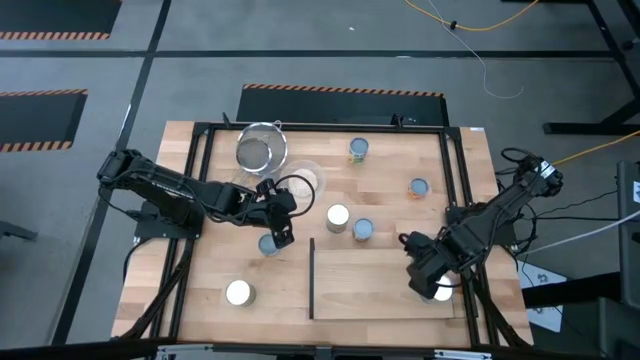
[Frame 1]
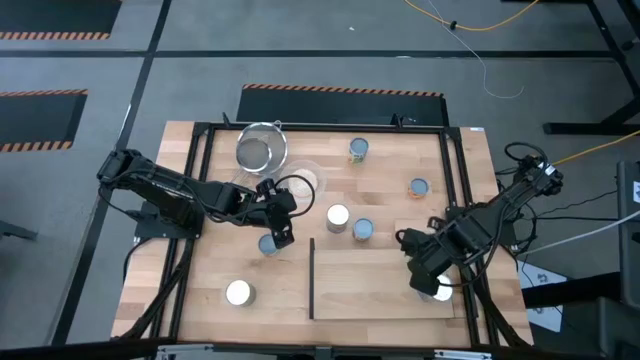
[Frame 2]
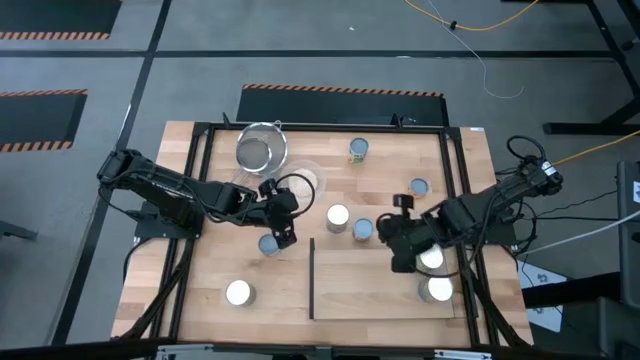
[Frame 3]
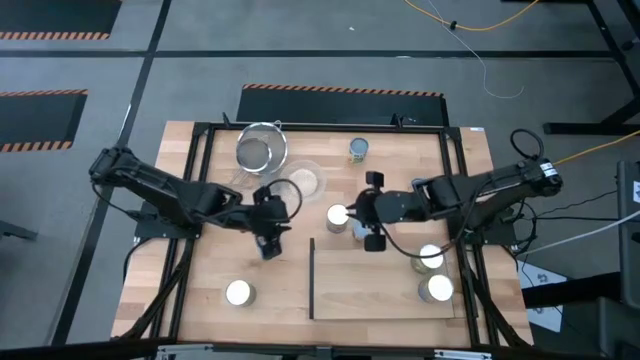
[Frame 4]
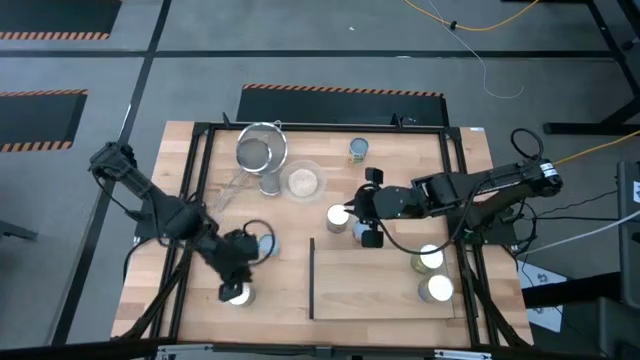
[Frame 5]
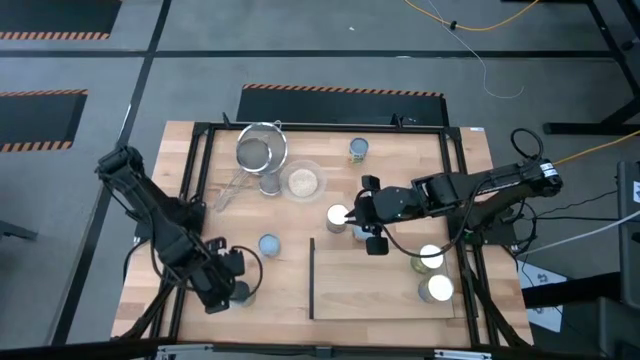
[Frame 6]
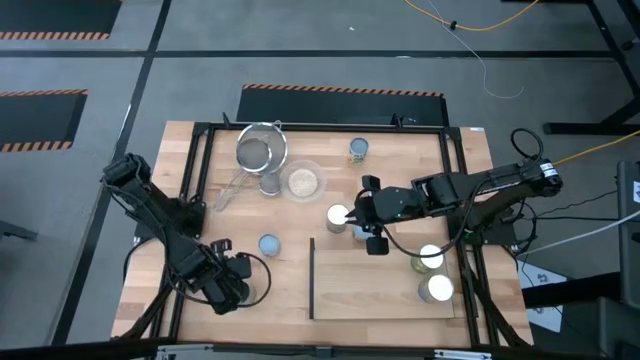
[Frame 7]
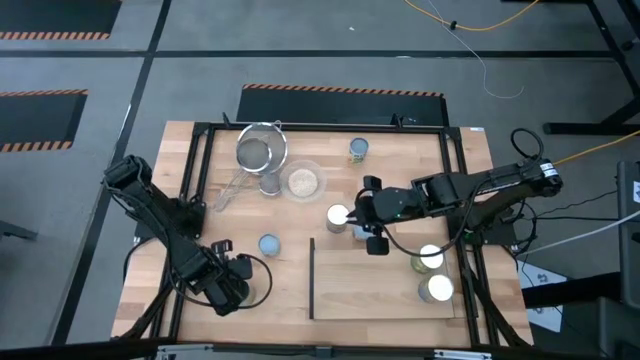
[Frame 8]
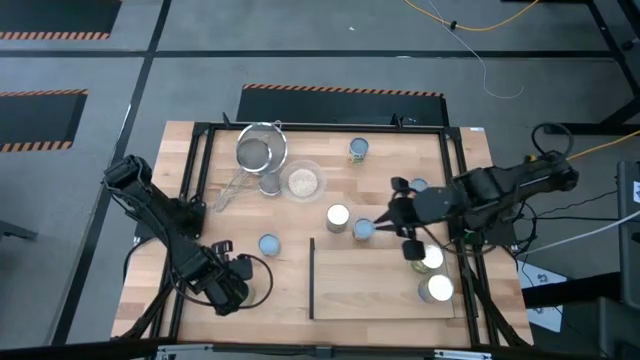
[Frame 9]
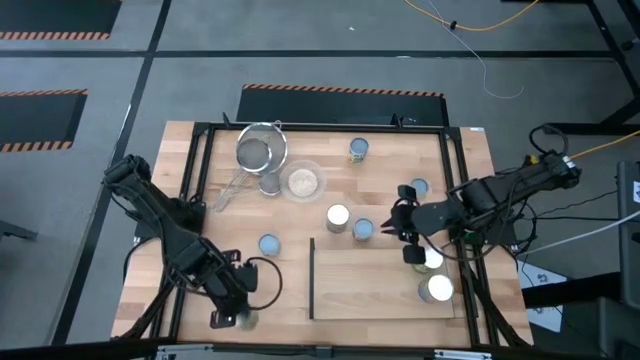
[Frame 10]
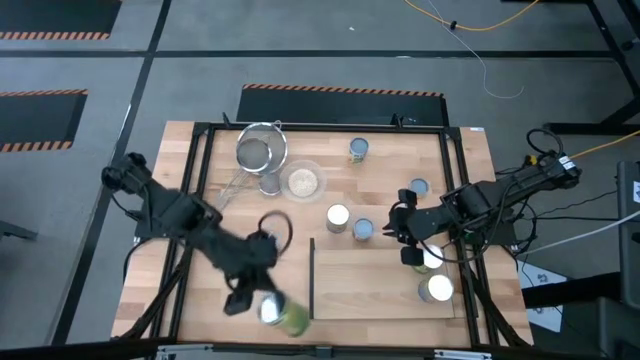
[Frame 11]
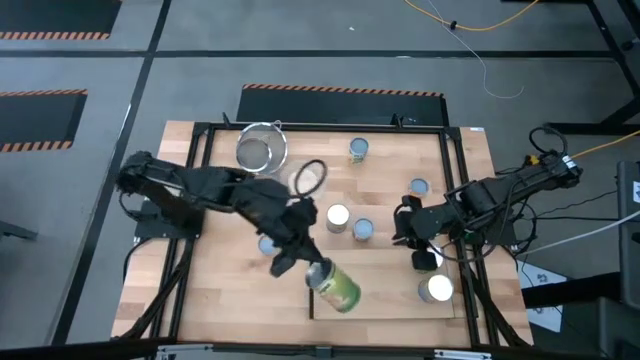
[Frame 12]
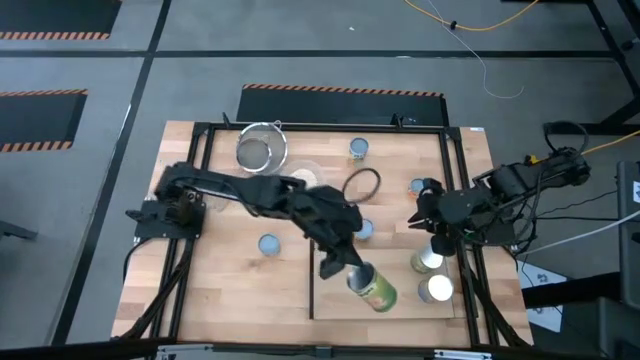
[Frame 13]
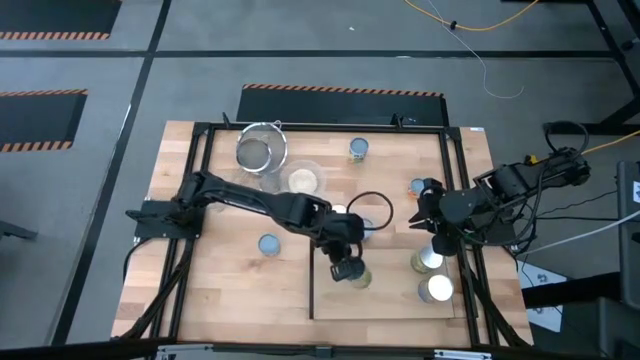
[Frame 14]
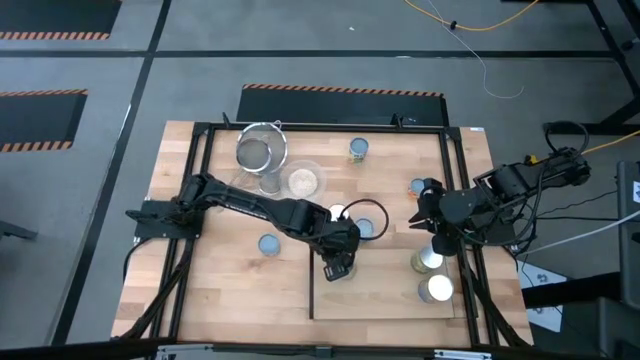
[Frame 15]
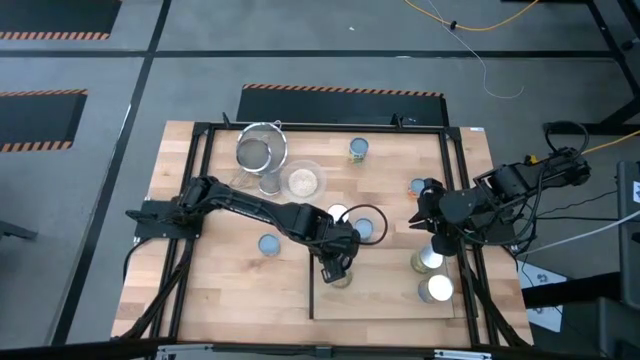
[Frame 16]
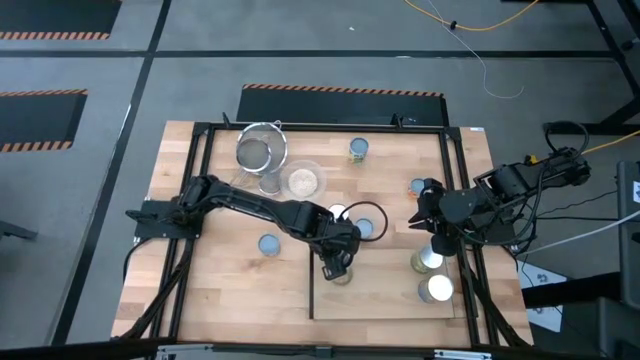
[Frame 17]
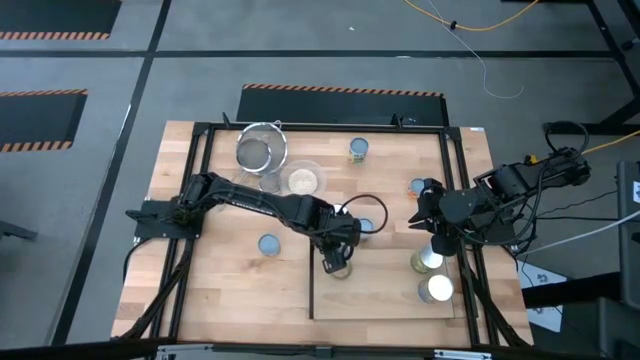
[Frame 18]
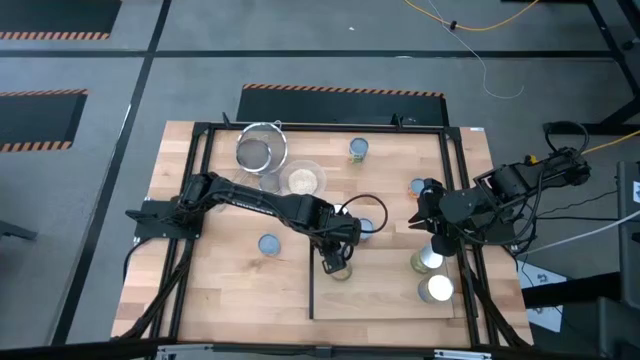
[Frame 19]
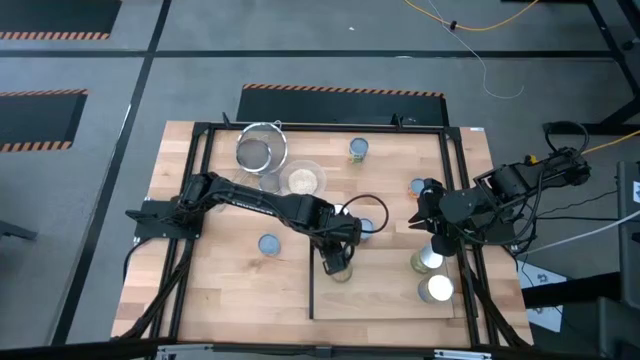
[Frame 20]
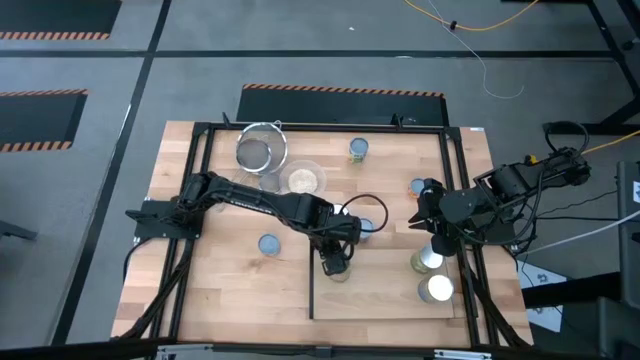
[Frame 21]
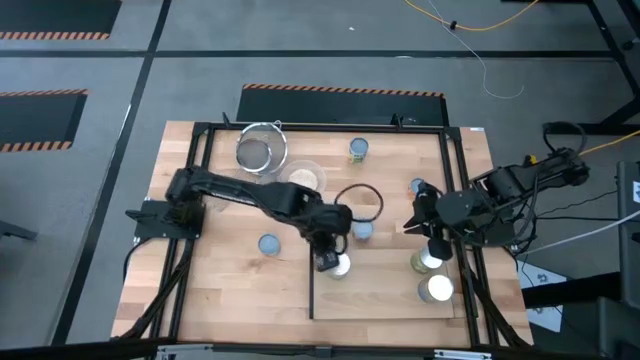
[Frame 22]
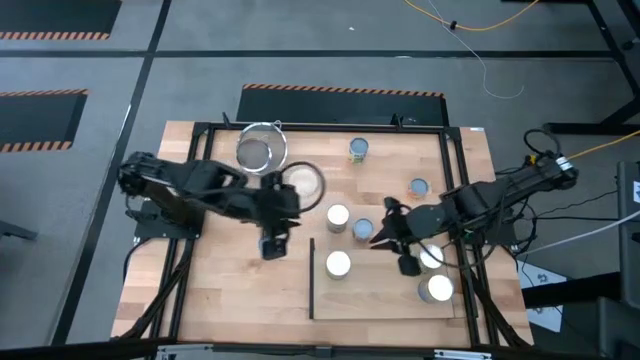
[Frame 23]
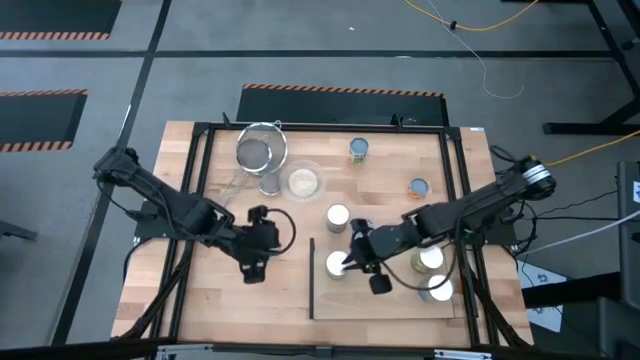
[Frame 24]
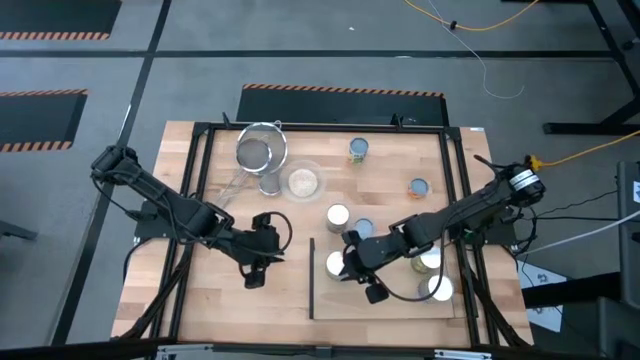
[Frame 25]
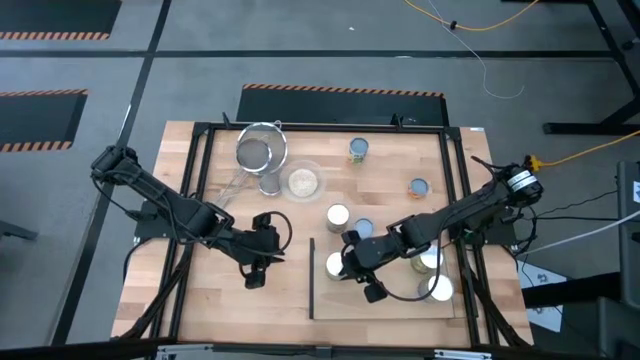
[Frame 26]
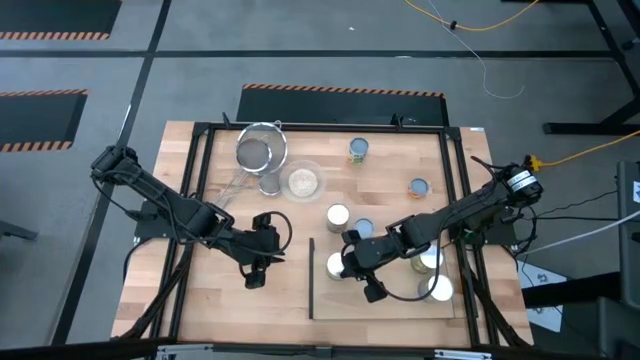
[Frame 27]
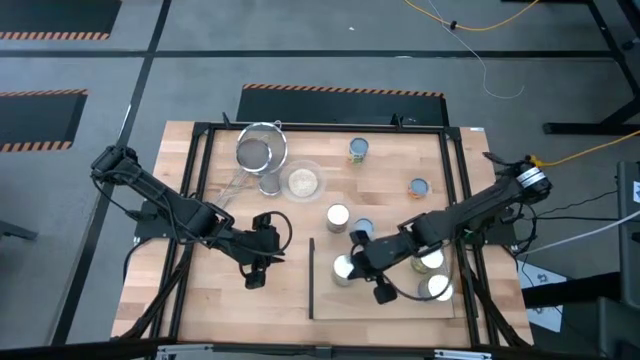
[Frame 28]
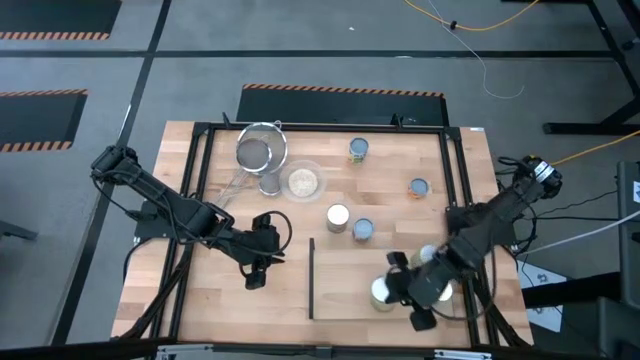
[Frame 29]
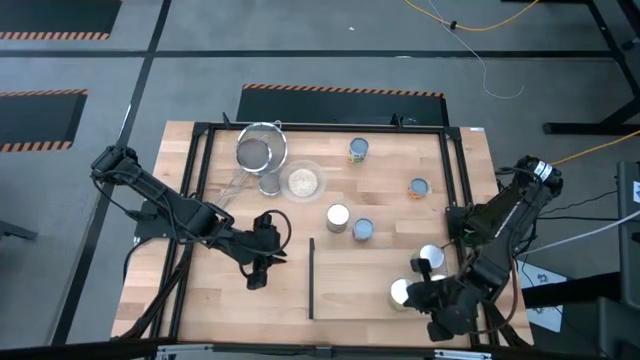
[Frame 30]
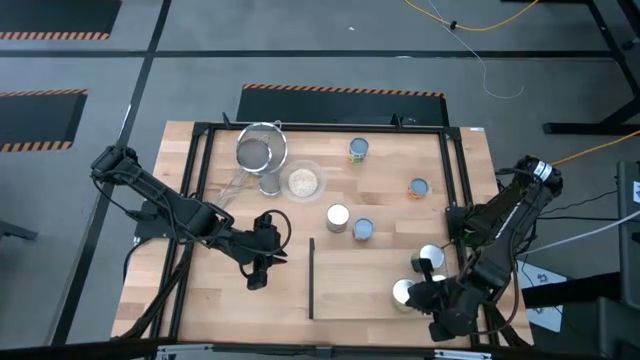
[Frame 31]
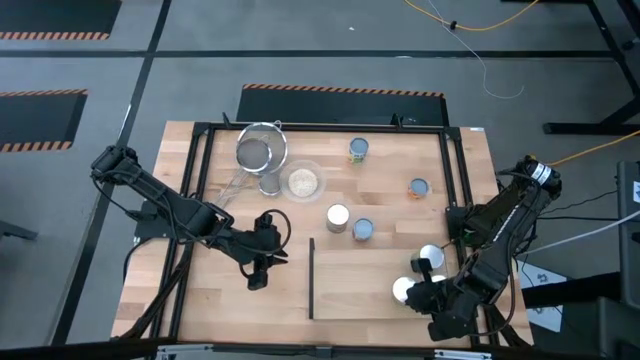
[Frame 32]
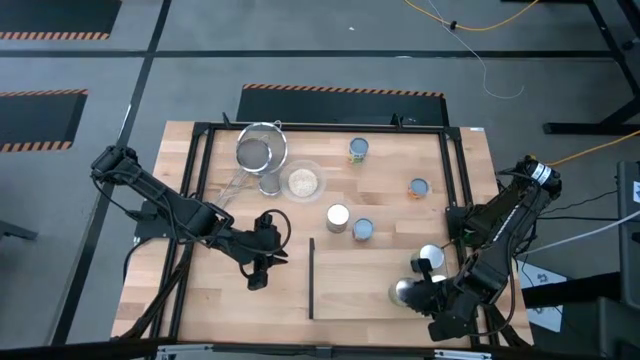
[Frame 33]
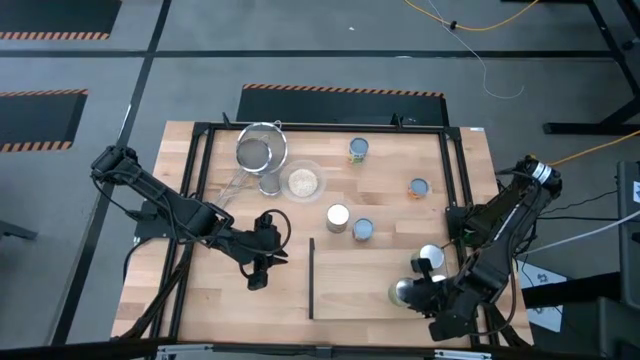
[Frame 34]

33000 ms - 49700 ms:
Task: Pick and place cans onto a shelf
Put the light green can on the shelf

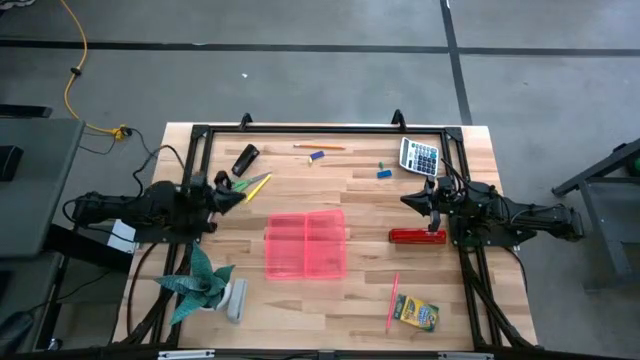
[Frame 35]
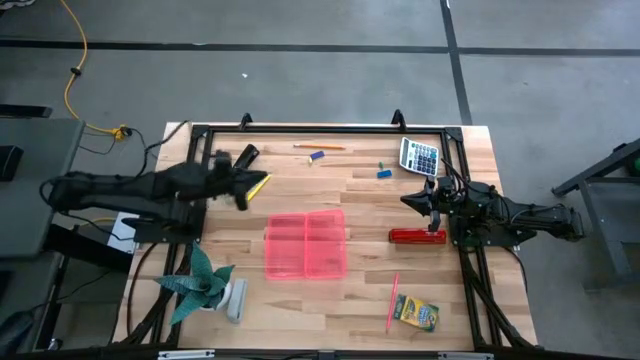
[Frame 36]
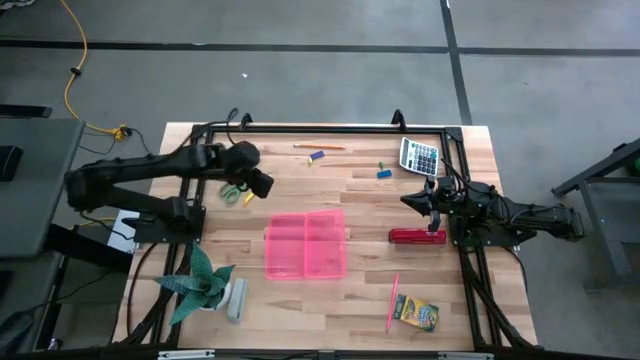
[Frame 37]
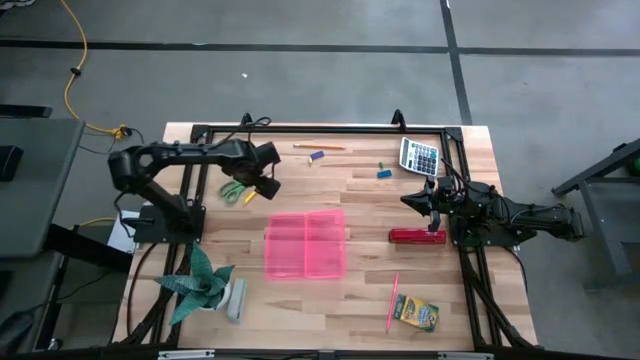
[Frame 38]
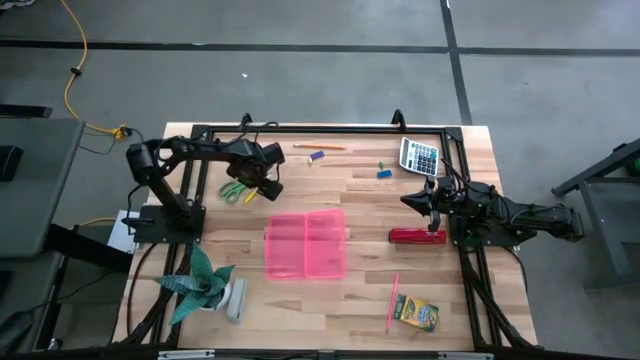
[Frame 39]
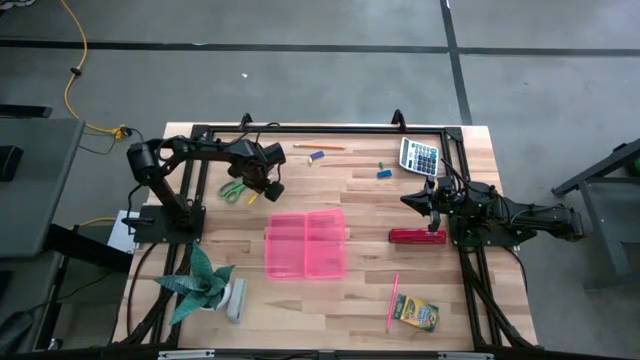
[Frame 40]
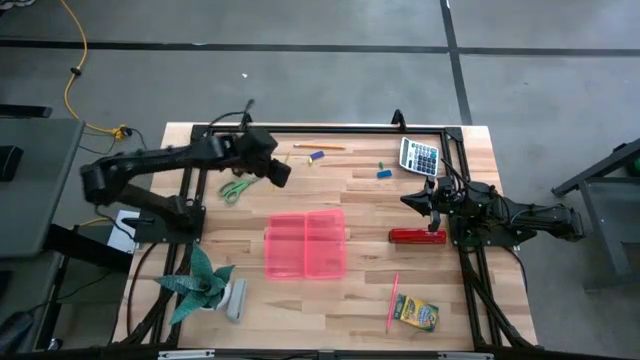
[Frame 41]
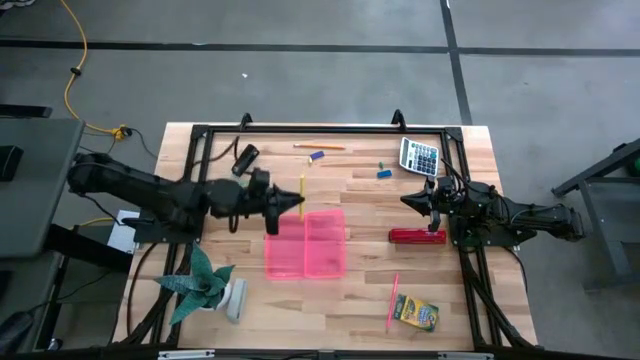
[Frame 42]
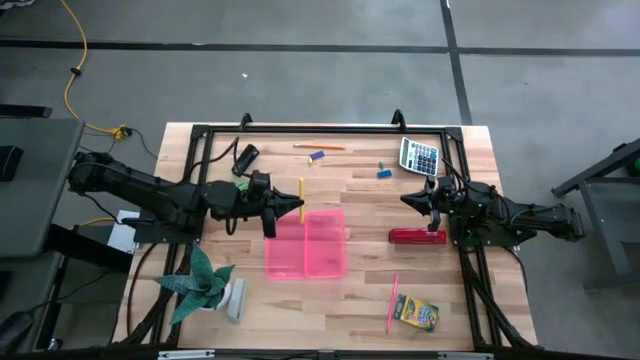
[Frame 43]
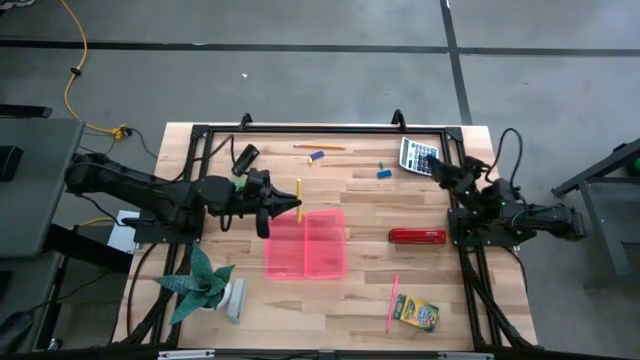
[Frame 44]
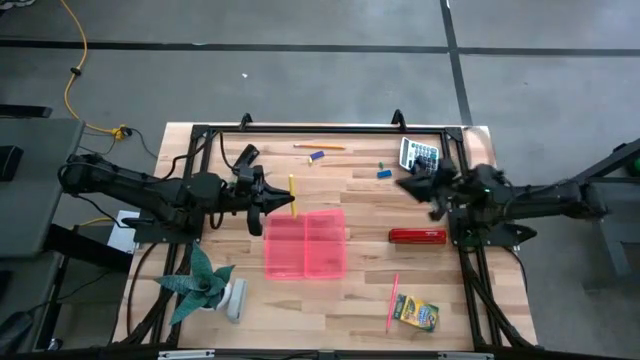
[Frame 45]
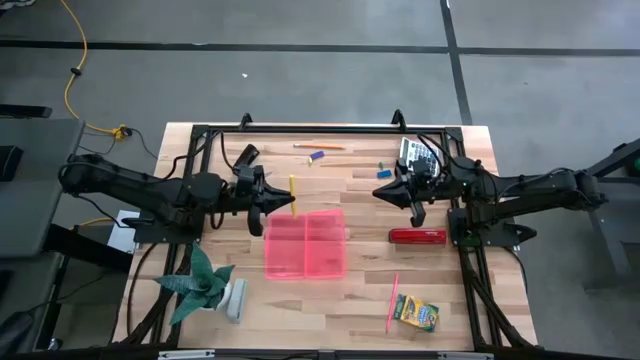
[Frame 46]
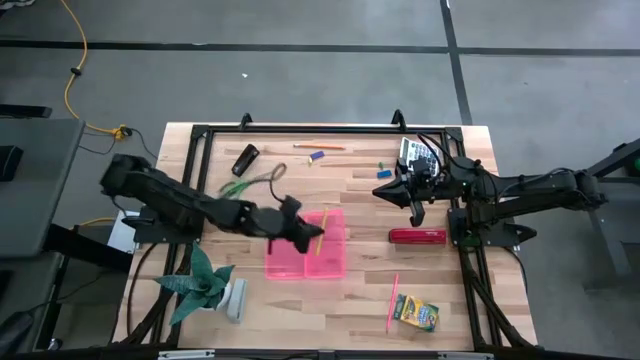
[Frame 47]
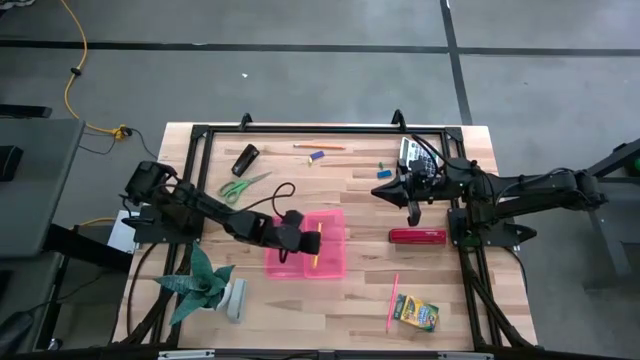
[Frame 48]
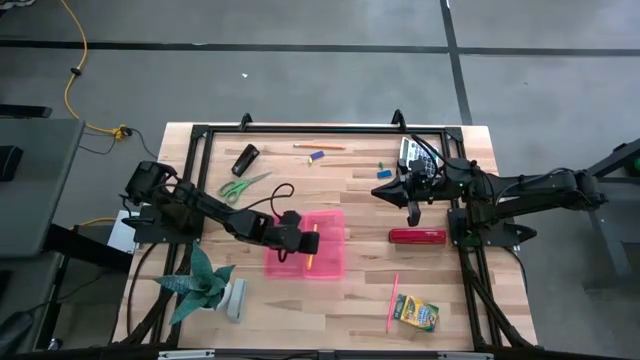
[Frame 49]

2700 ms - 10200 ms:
Task: Pack school essentials
Put the yellow pen into the pink supply box
